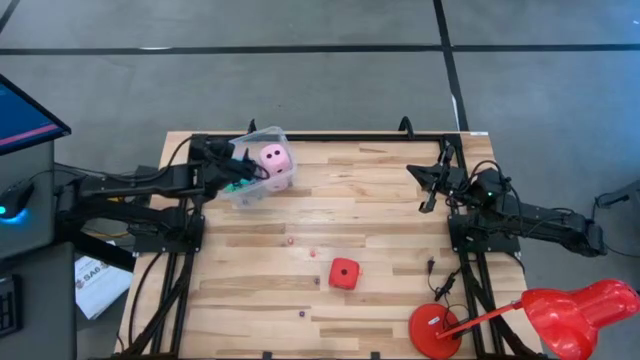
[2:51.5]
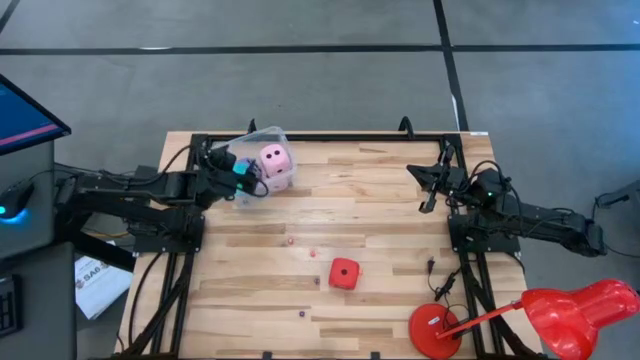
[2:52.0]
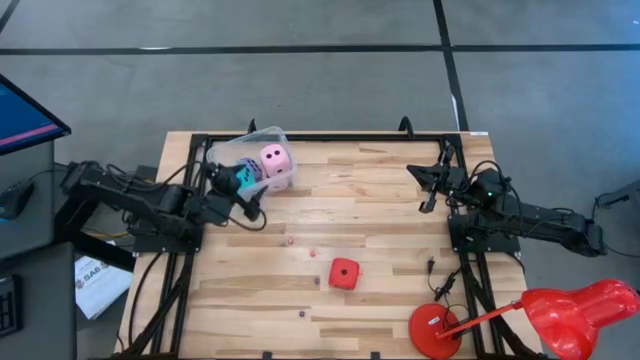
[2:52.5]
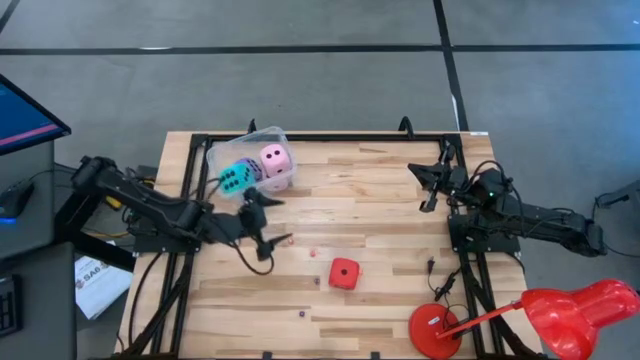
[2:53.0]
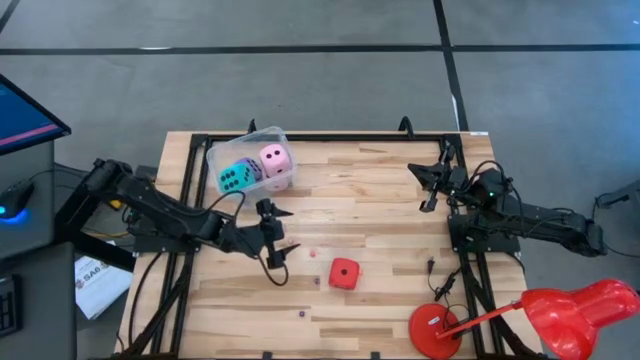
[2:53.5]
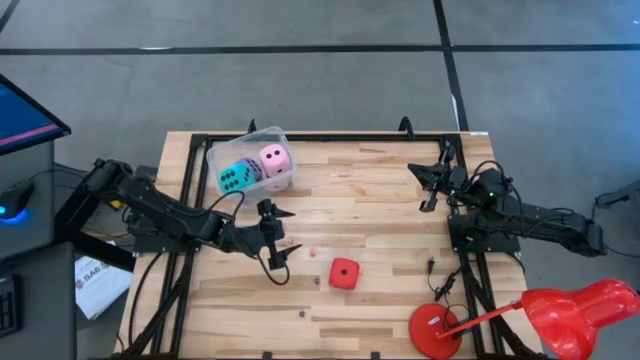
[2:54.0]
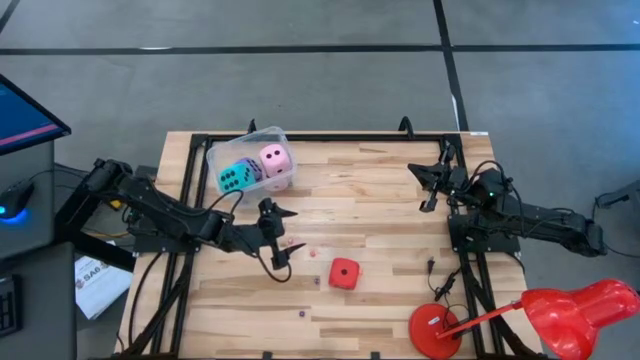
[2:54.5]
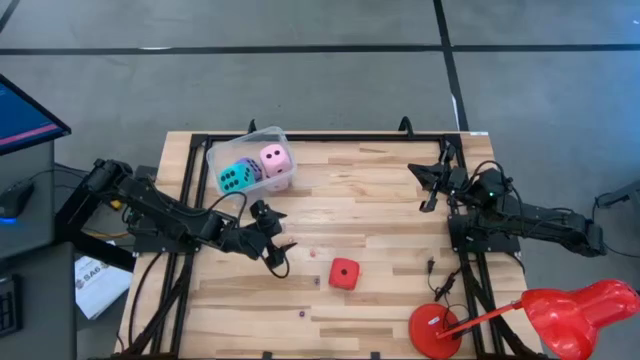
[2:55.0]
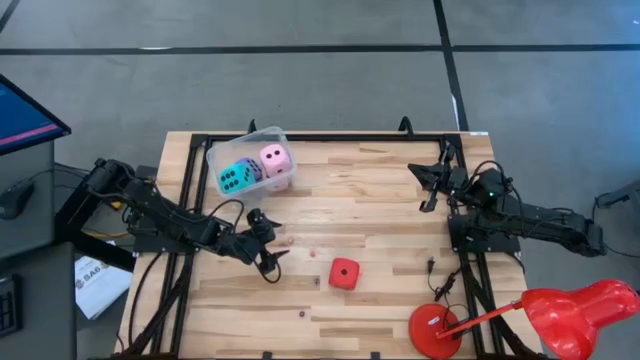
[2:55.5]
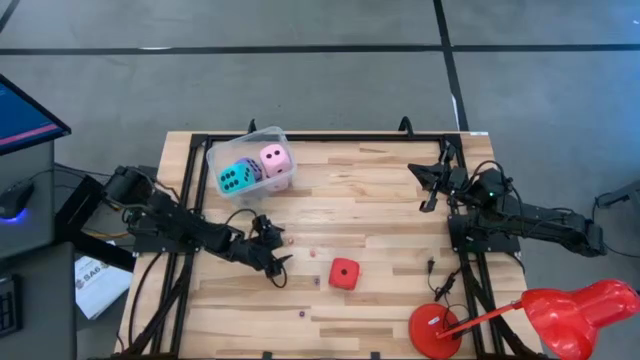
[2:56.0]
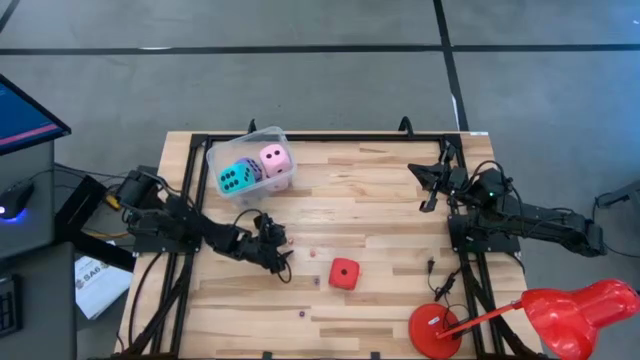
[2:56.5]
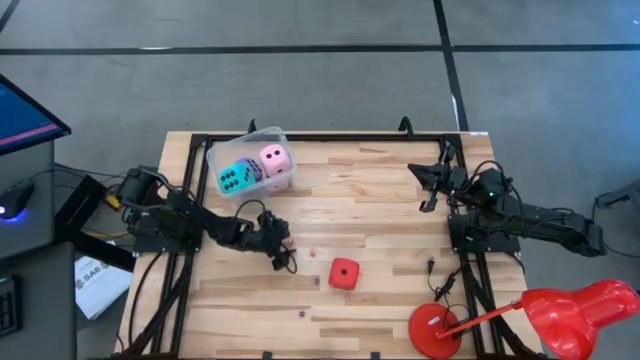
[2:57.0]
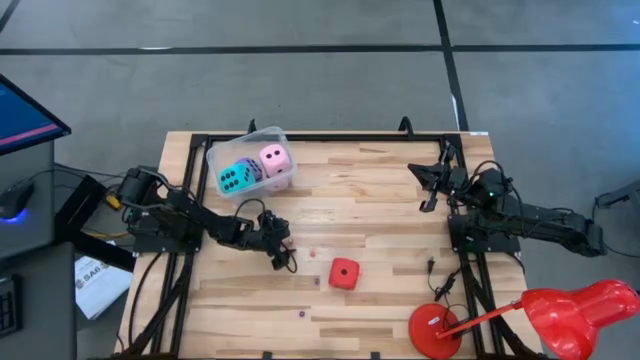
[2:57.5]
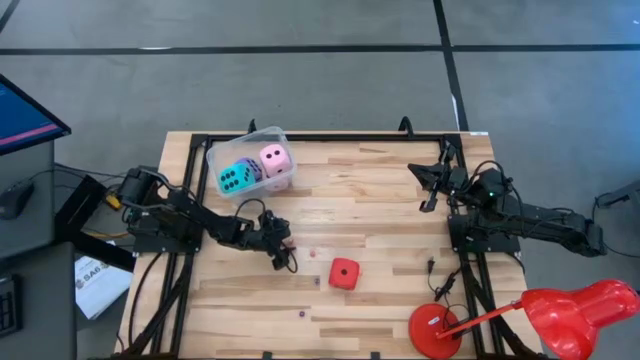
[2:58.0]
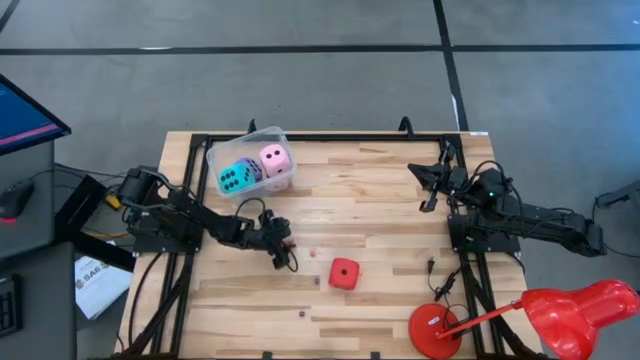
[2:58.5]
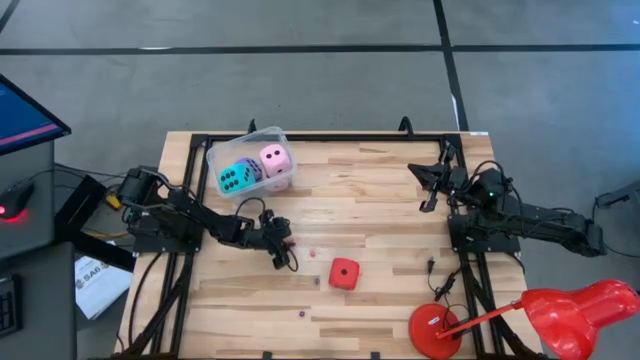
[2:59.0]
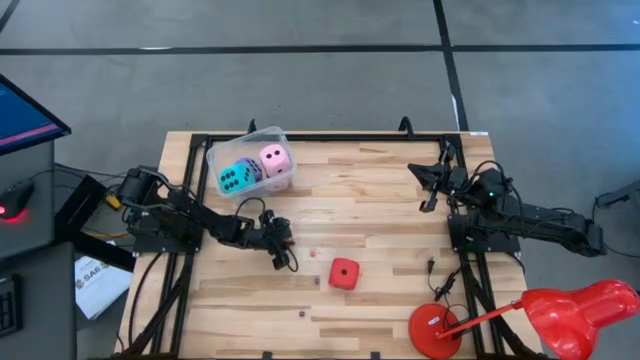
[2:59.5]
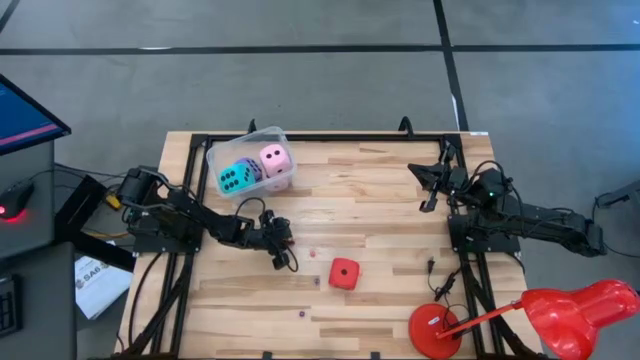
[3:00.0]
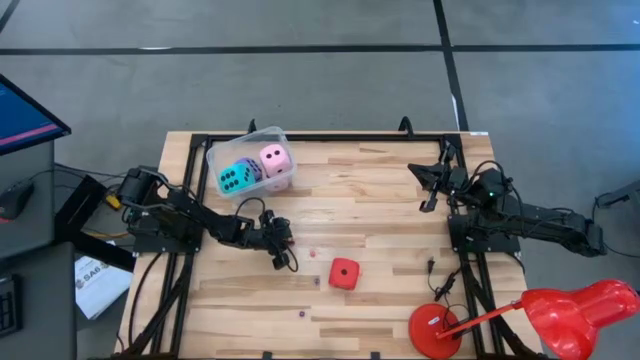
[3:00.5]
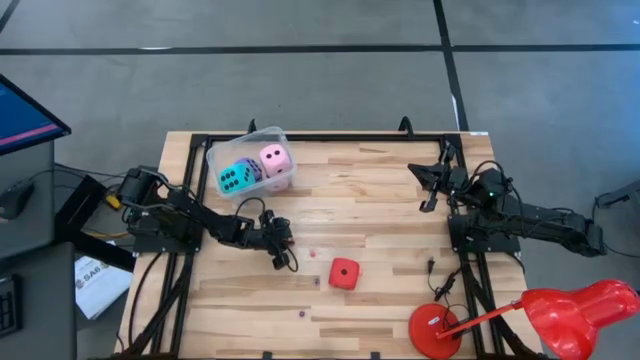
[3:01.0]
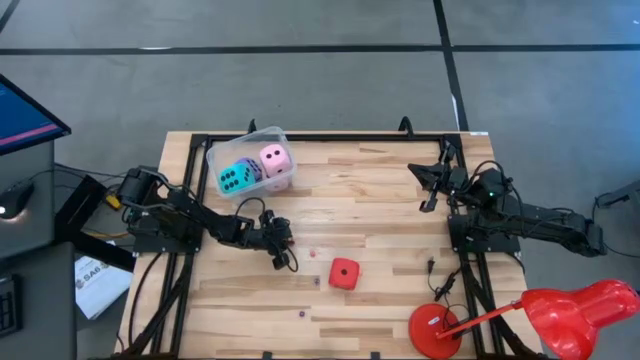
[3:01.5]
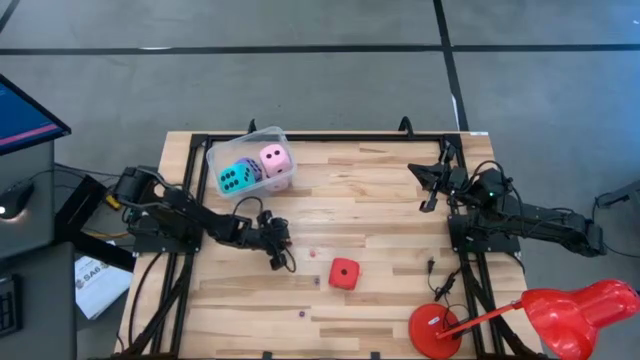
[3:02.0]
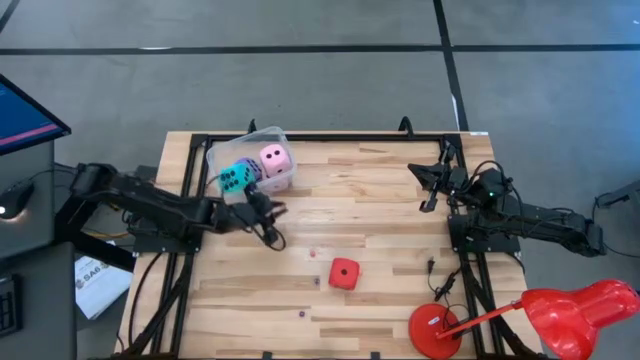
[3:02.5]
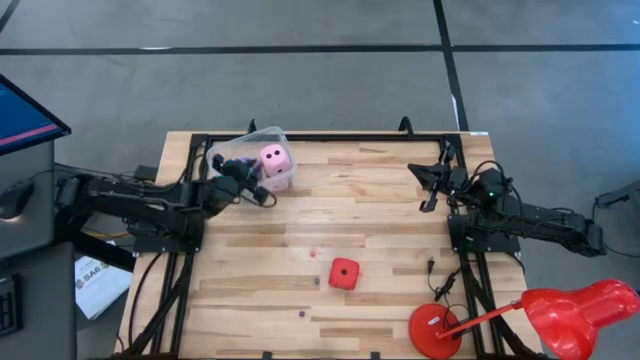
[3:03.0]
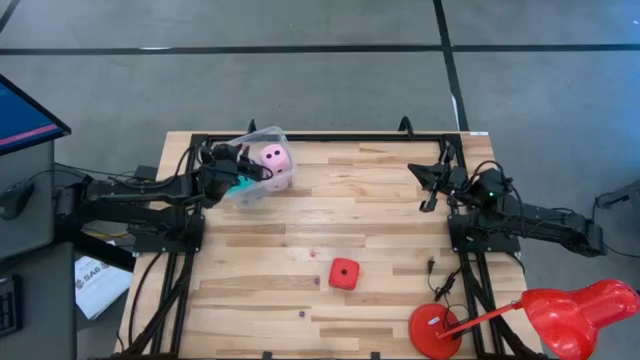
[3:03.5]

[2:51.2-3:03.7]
Task: Pick & Place Dice
Put the left small red dice into the transparent container

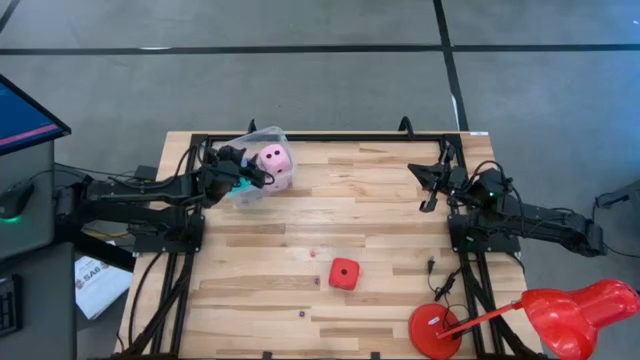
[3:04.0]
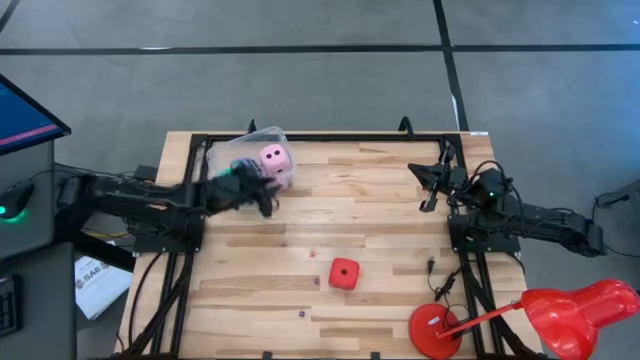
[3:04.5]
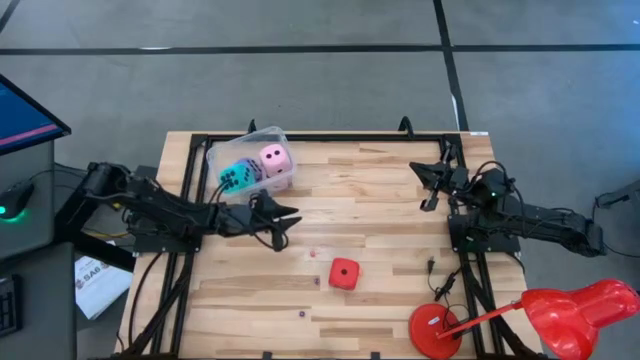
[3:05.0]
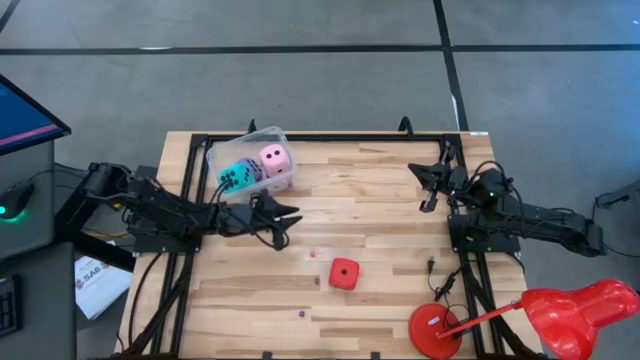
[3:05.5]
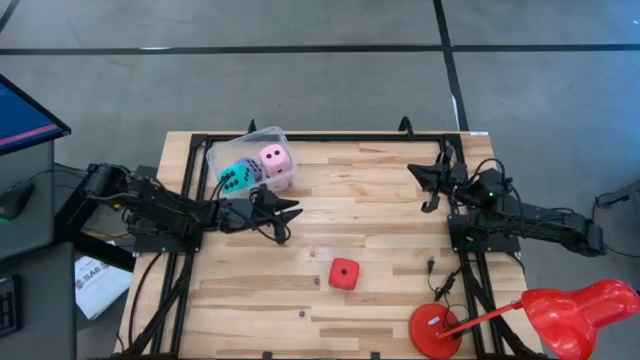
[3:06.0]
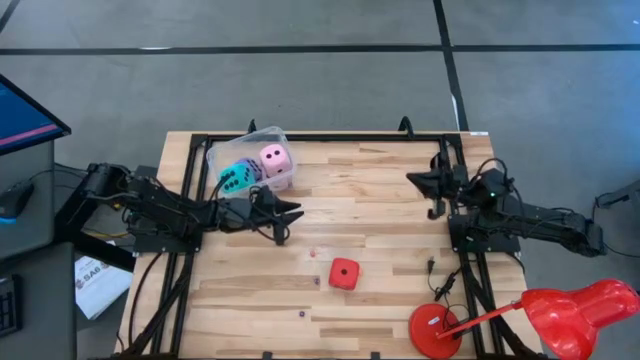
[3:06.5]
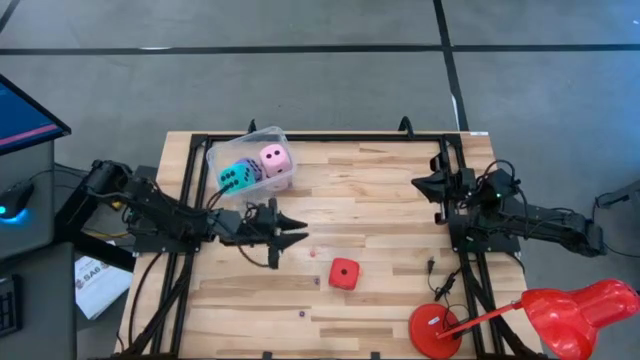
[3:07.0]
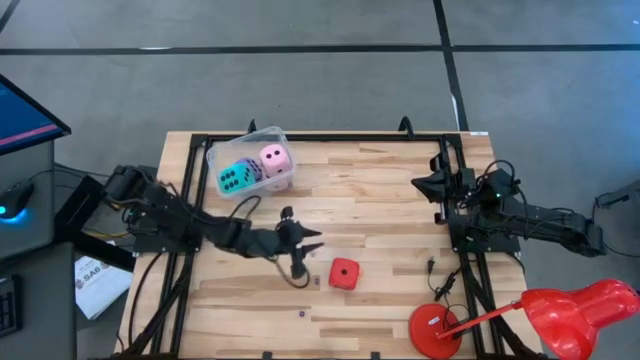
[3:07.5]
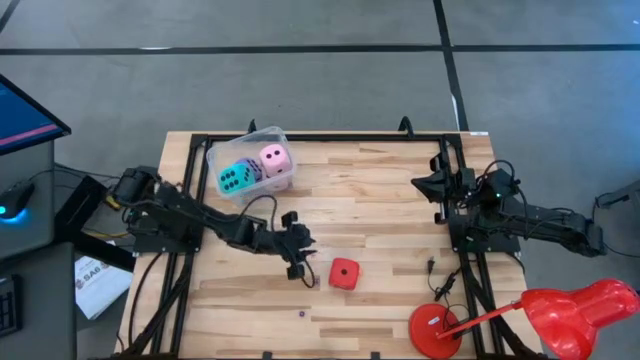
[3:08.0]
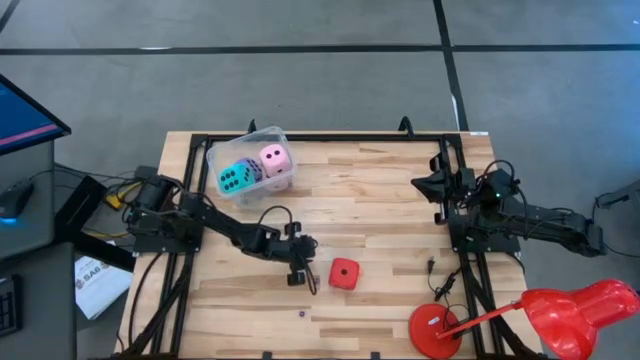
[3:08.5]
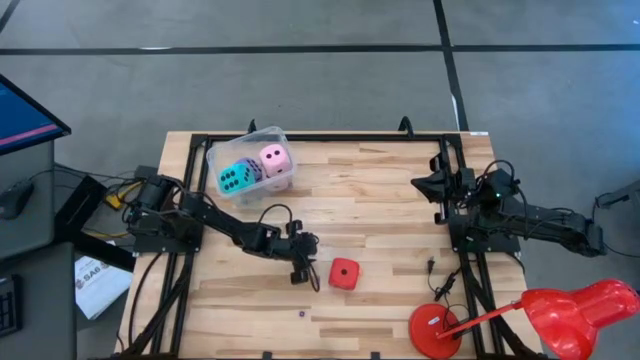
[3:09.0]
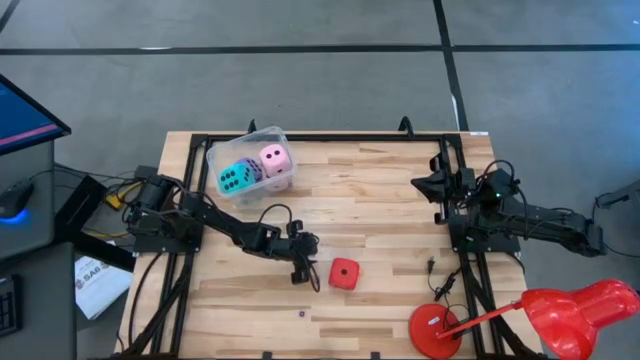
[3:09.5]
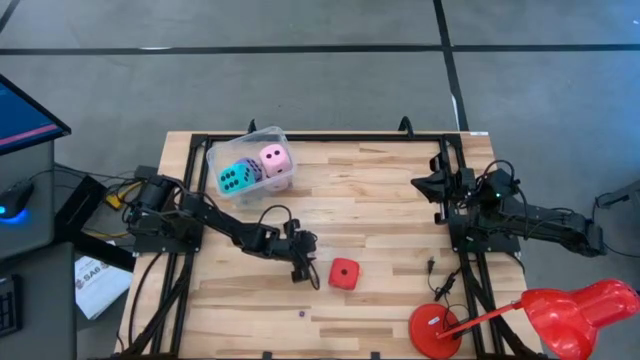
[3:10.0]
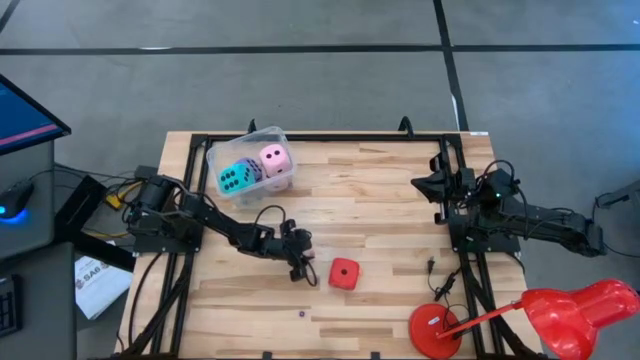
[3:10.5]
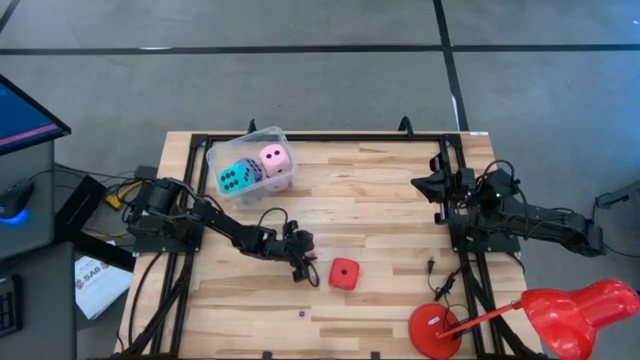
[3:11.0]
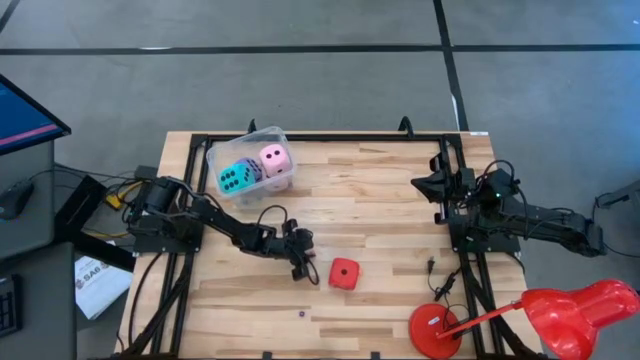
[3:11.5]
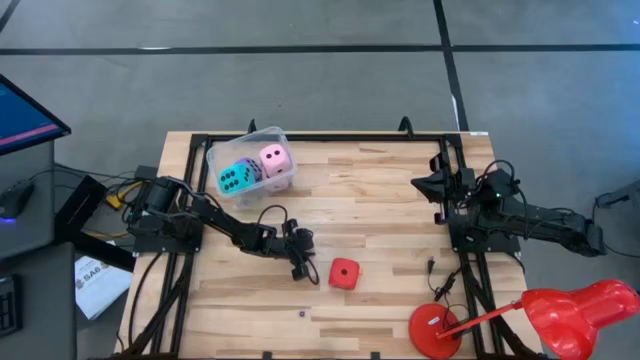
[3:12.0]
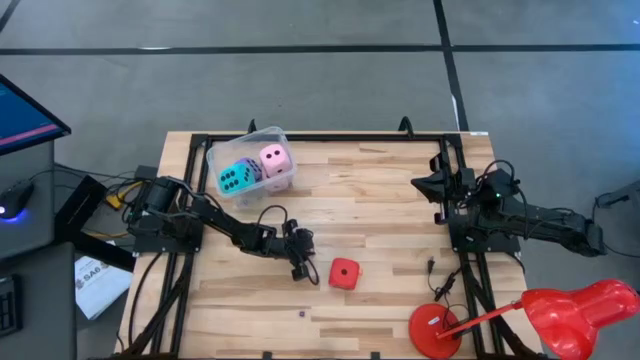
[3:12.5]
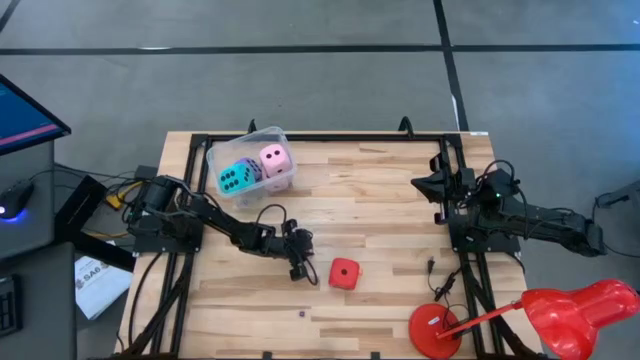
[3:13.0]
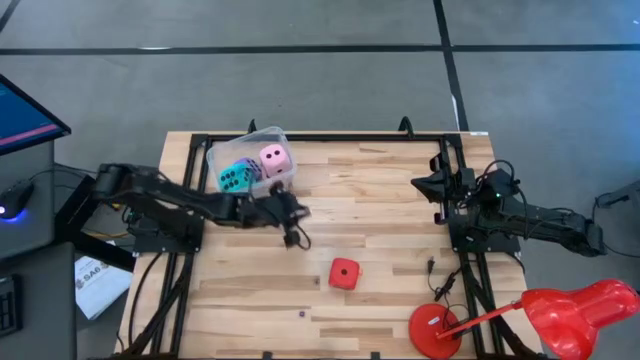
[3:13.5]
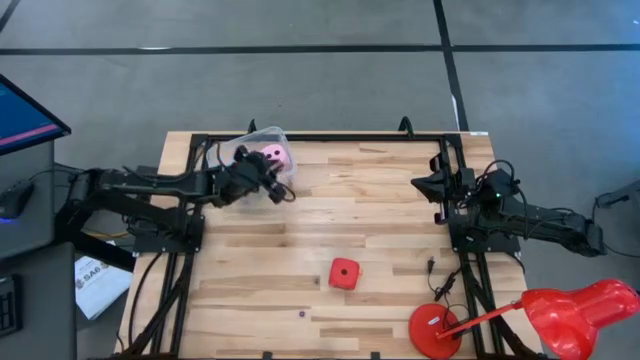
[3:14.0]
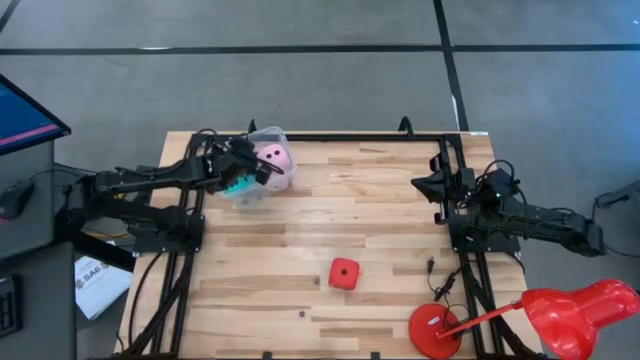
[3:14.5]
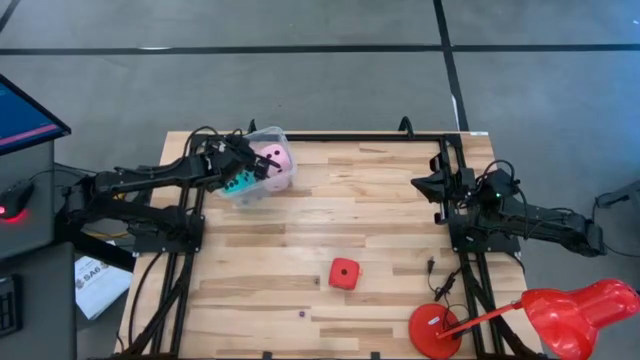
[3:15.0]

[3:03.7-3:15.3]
Put the small red dice into the transparent container
